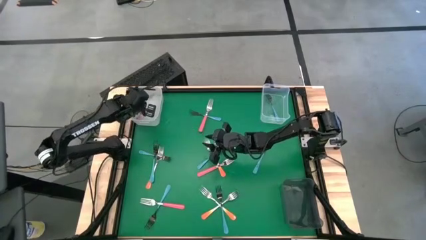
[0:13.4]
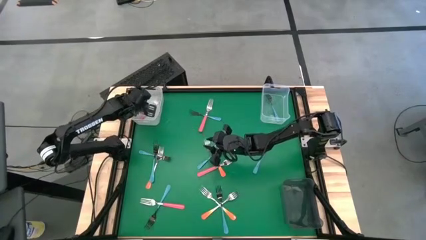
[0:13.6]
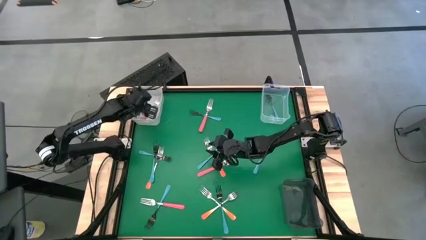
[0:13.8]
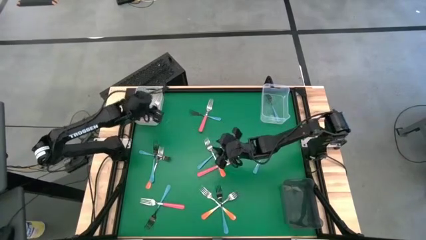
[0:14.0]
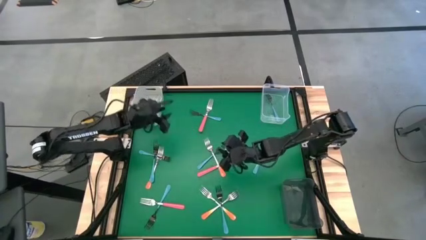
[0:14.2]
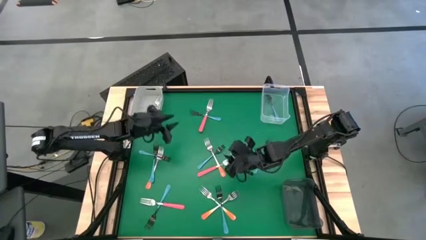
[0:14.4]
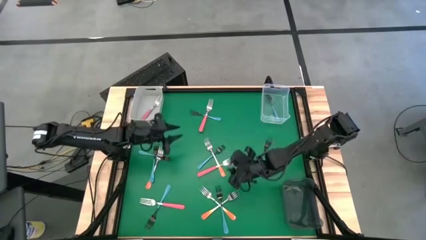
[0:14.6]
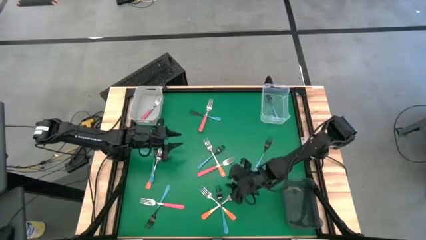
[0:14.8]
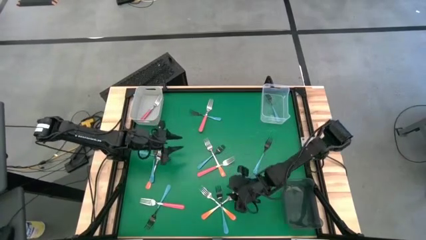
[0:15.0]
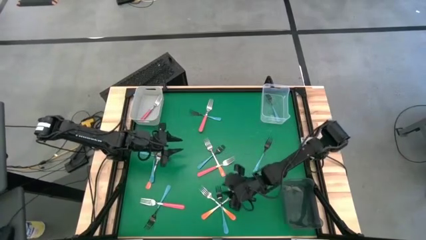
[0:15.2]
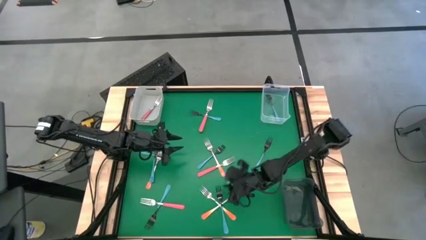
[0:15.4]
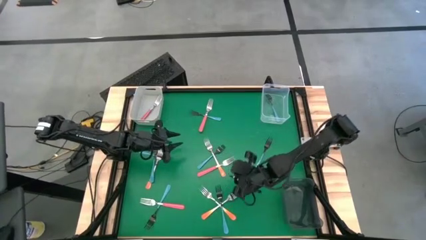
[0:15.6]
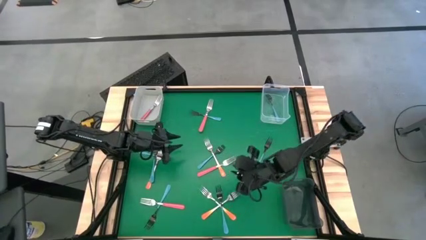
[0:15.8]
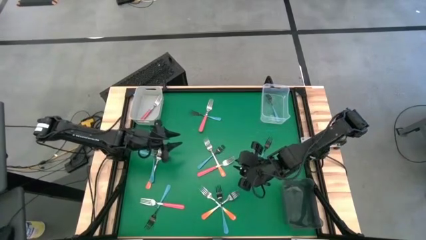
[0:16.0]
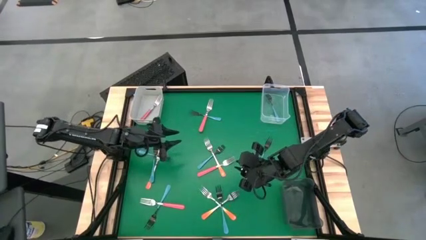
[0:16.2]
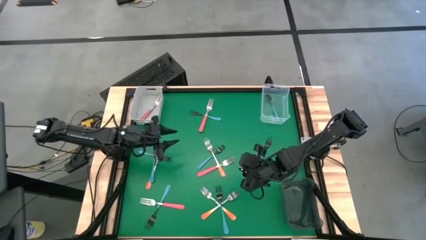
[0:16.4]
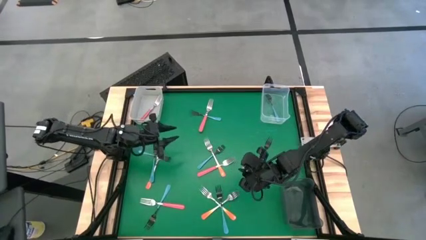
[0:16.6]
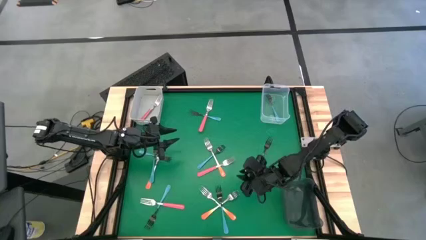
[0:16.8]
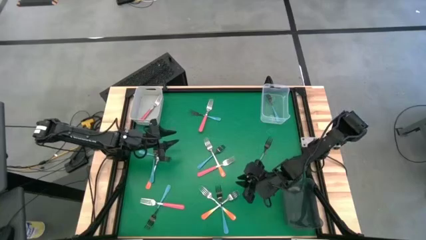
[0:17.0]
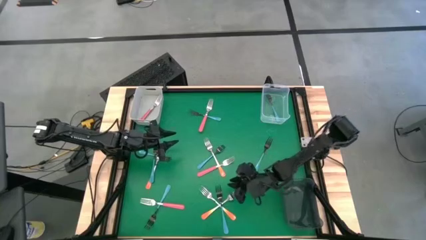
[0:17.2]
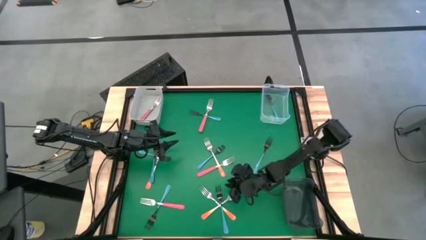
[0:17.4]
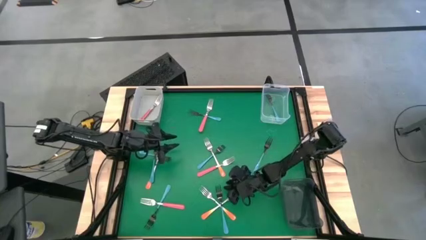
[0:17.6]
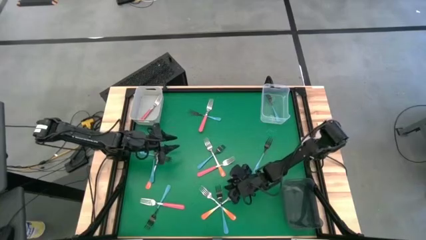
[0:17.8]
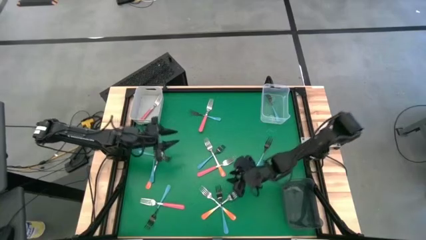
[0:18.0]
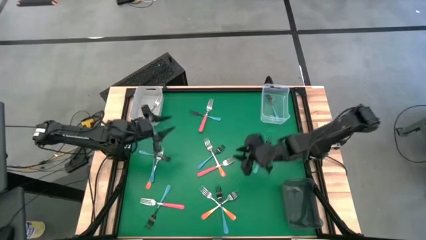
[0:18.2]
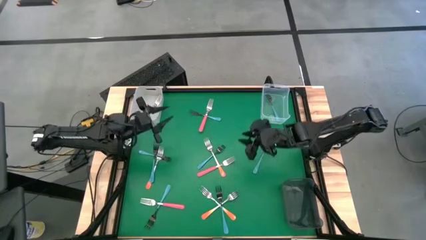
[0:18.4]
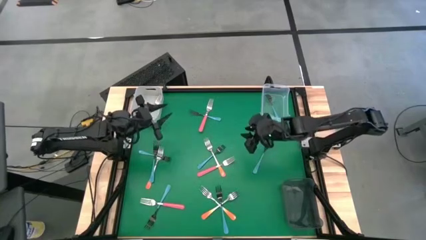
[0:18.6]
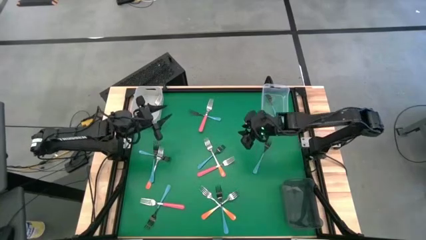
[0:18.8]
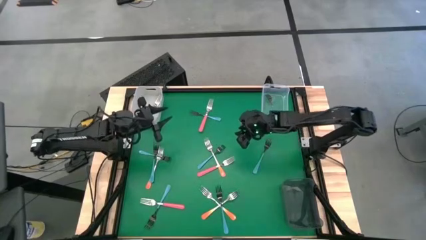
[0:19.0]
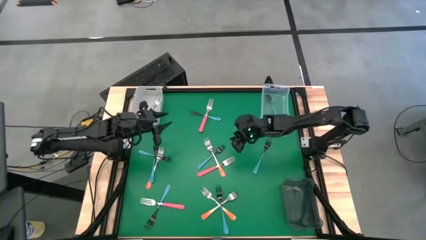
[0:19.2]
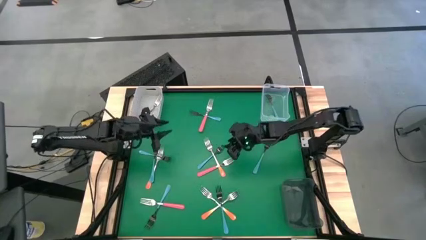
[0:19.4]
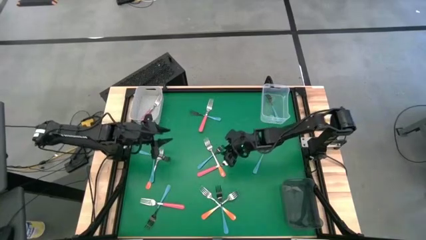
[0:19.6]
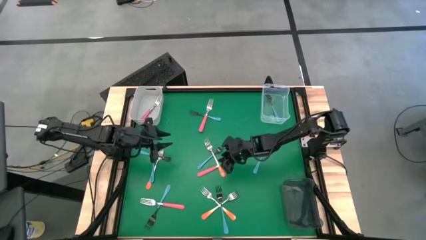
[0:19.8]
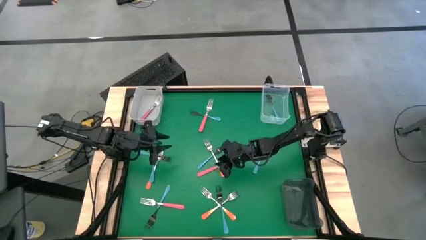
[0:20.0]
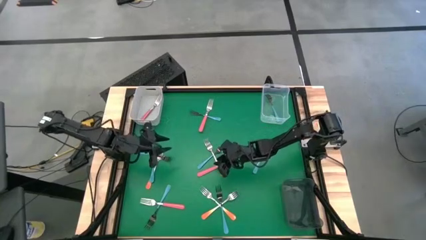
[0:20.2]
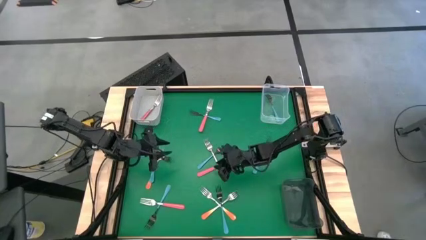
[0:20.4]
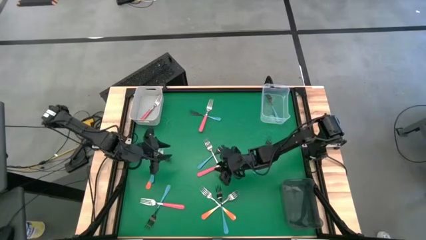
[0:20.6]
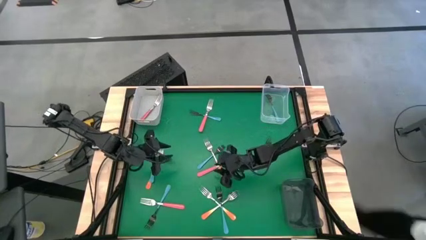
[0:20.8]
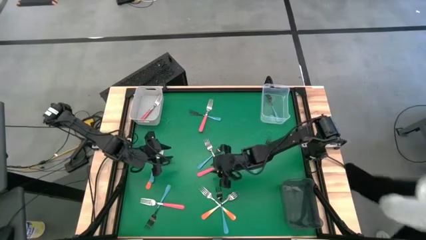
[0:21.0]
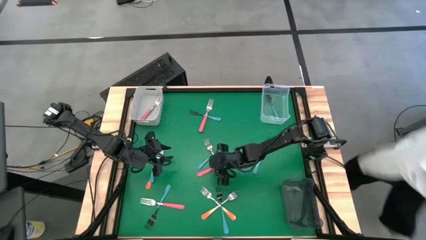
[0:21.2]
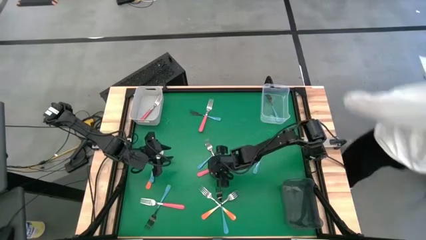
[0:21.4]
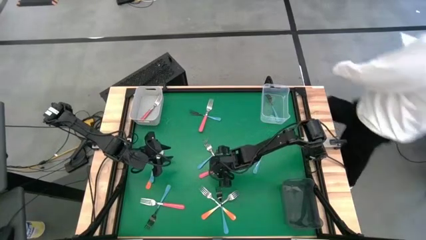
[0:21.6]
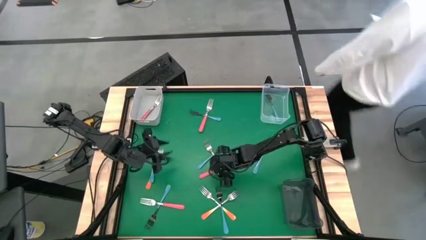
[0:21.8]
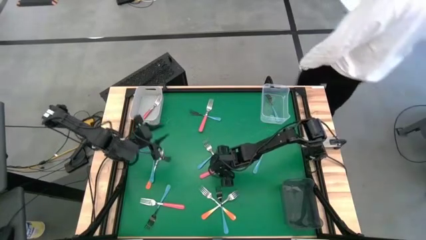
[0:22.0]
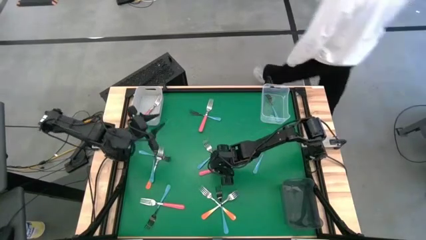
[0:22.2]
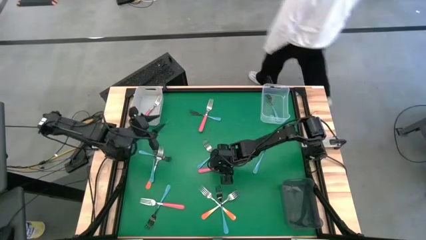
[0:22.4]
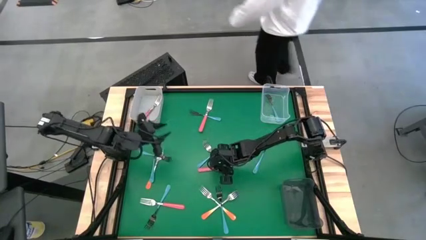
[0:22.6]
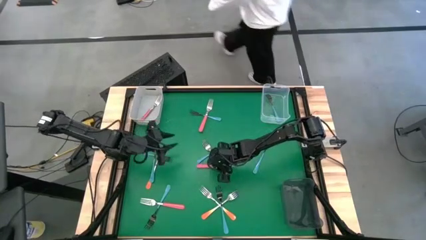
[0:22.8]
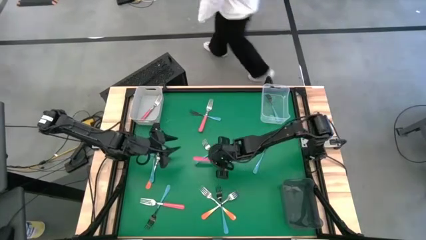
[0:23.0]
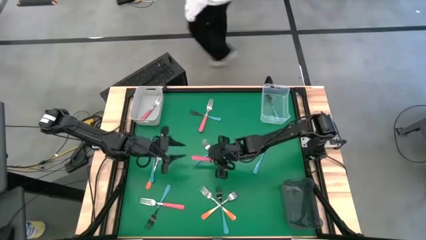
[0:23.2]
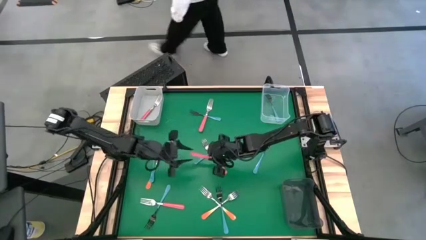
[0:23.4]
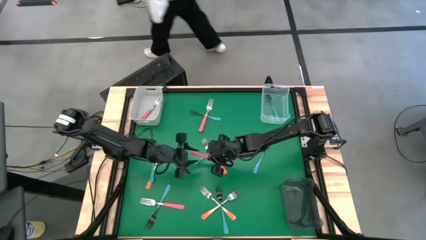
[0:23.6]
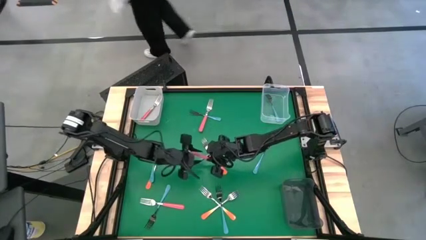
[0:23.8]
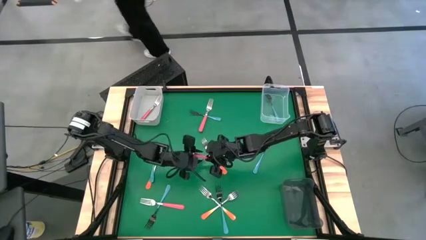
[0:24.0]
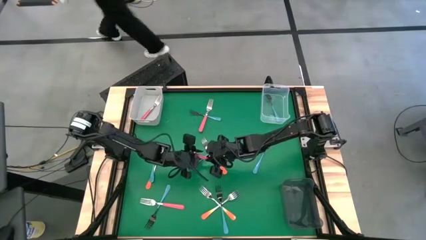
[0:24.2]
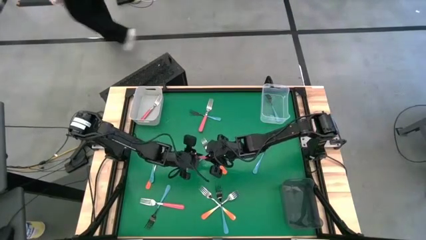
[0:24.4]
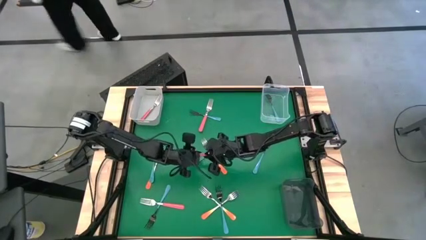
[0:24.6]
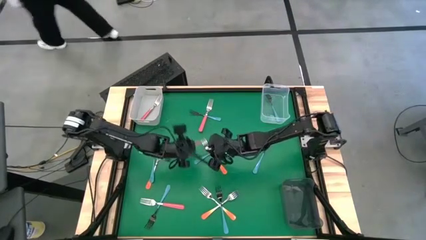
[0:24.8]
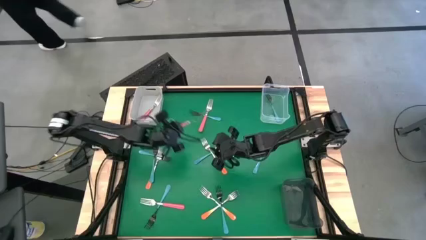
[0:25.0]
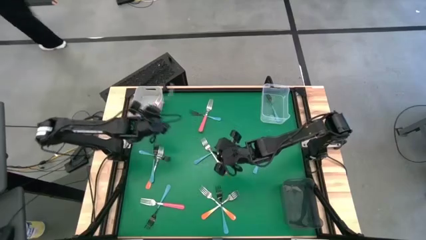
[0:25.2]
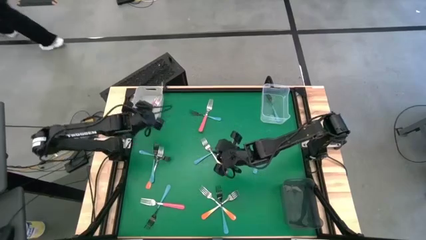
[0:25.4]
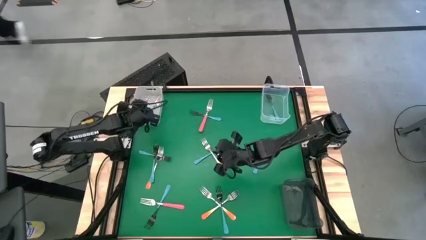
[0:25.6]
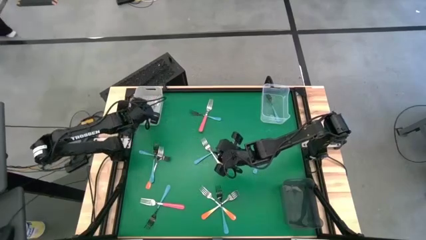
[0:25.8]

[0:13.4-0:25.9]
Task: Sort silverware by color (type)
Put the pink fork into the white bin

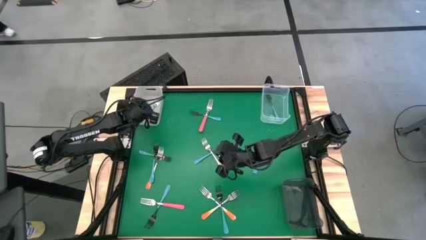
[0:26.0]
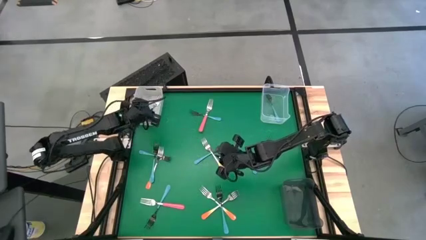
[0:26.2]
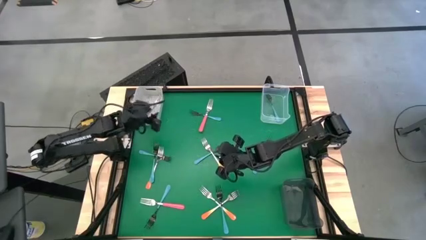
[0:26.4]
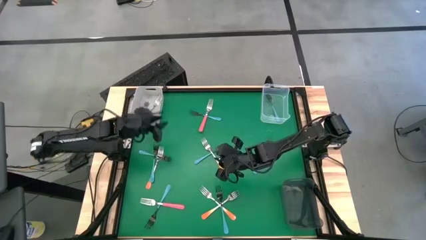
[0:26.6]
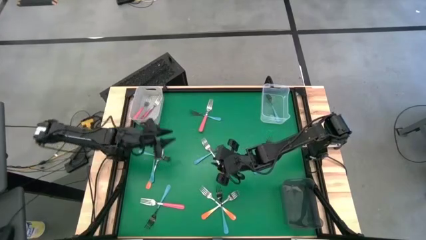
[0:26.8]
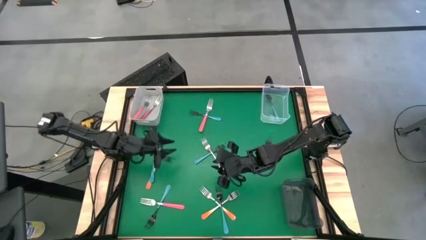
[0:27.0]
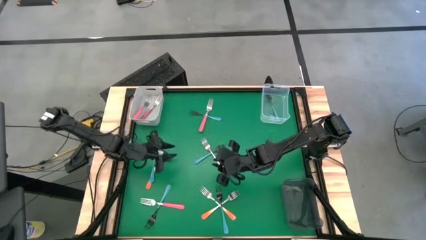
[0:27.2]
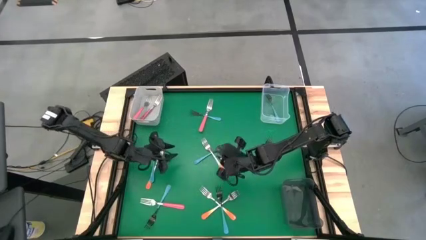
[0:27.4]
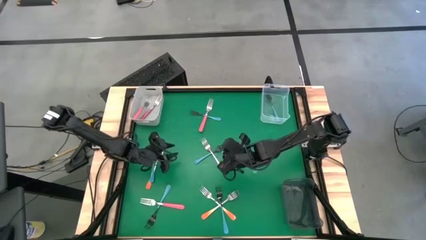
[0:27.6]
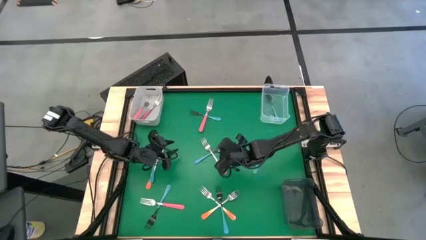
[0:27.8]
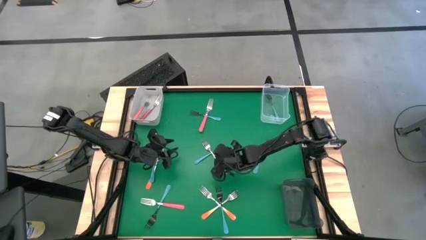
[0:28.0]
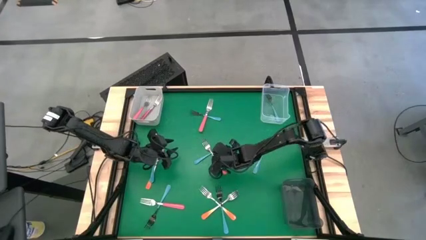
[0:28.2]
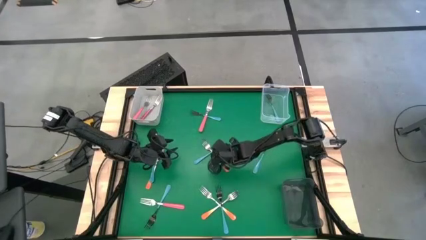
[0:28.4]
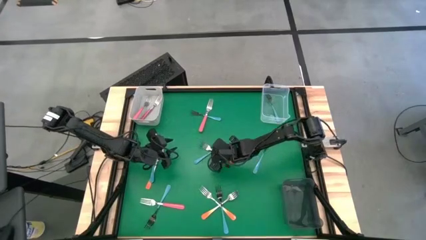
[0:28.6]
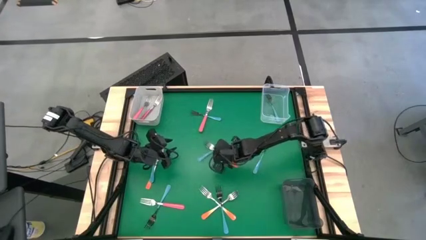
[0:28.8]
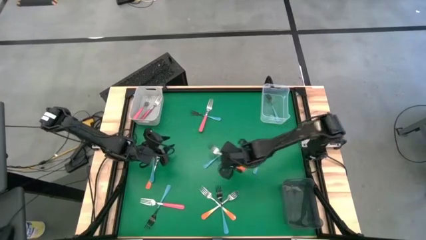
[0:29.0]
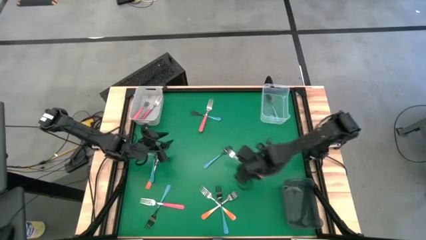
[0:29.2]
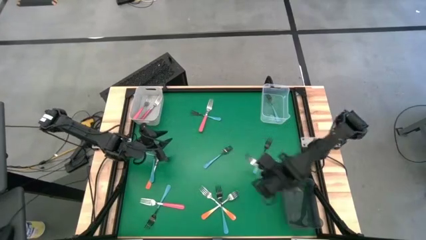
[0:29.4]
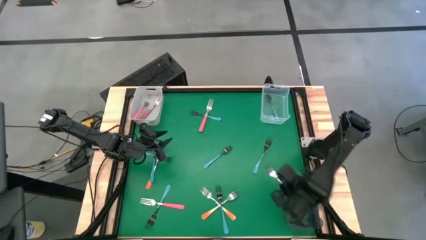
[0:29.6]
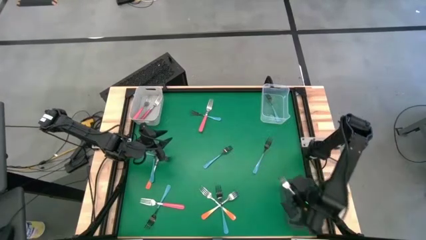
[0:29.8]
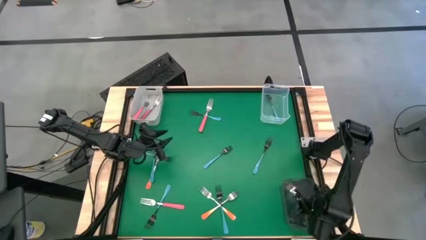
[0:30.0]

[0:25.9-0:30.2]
Put the orange fork into the black bin
